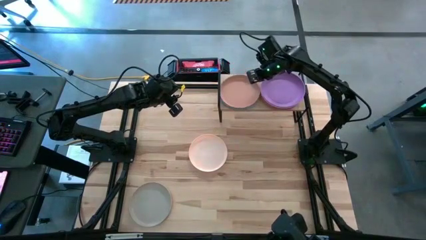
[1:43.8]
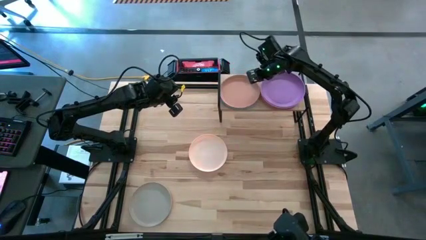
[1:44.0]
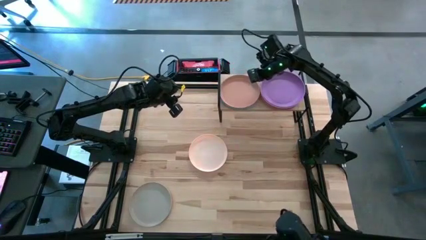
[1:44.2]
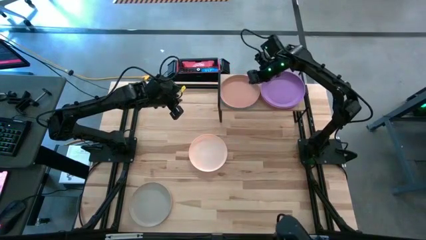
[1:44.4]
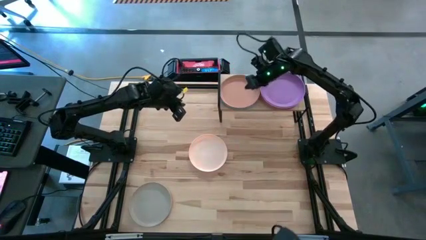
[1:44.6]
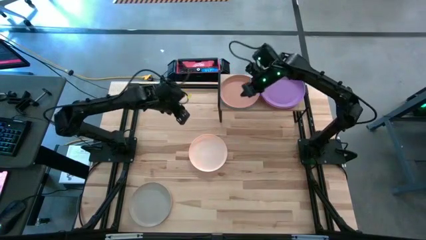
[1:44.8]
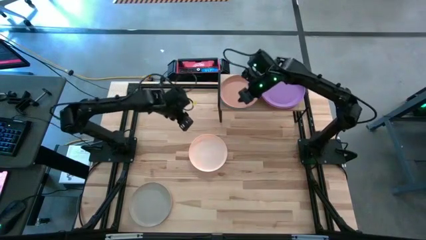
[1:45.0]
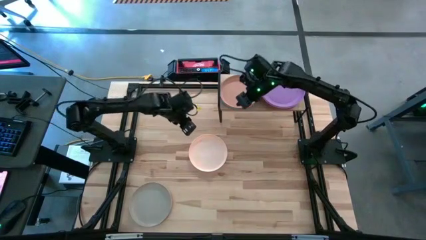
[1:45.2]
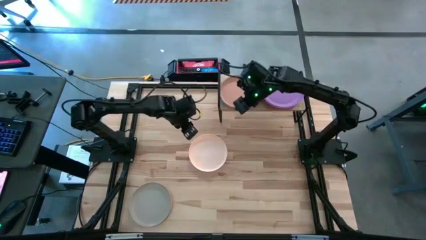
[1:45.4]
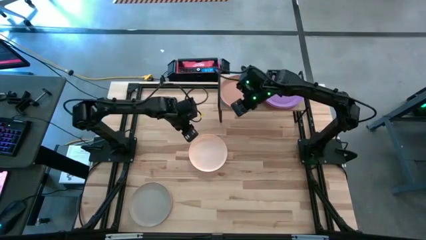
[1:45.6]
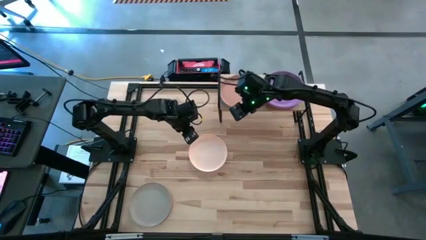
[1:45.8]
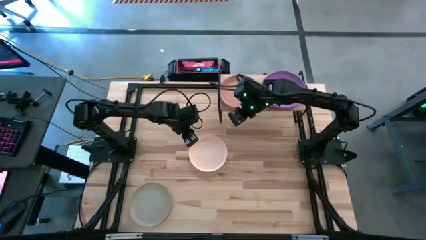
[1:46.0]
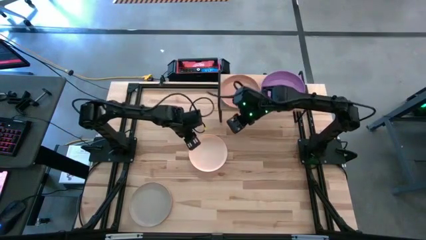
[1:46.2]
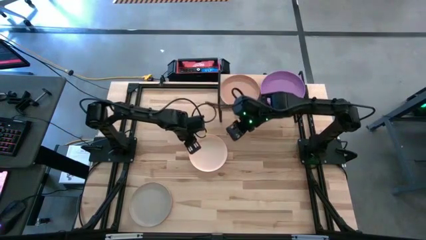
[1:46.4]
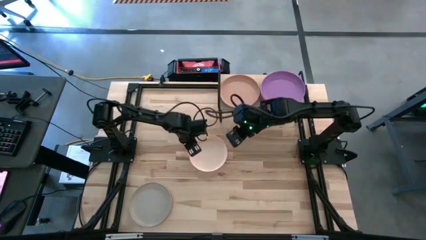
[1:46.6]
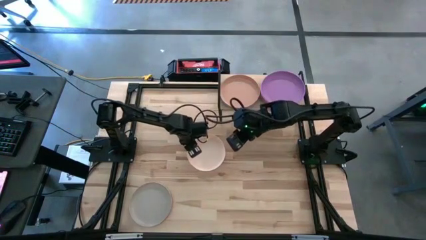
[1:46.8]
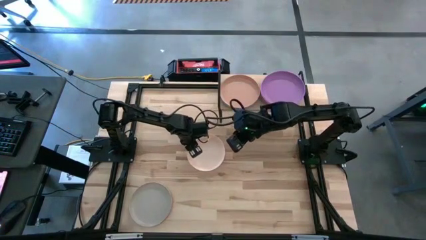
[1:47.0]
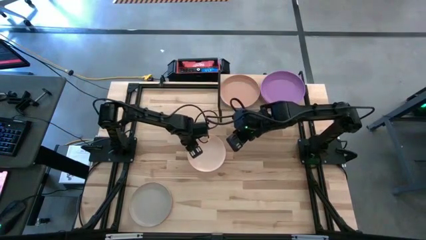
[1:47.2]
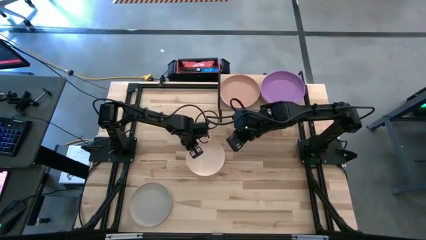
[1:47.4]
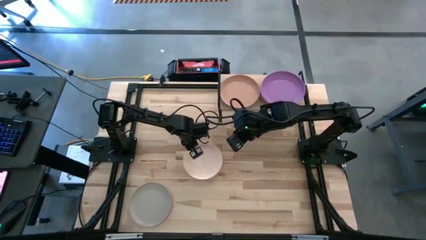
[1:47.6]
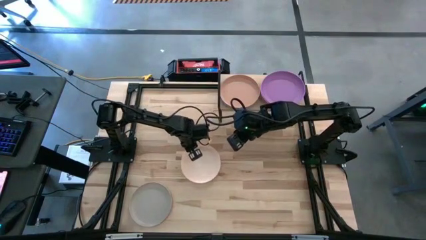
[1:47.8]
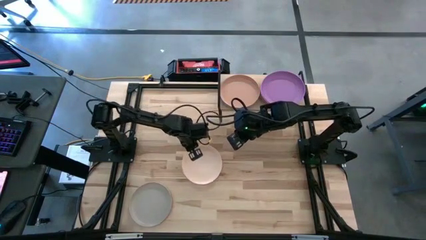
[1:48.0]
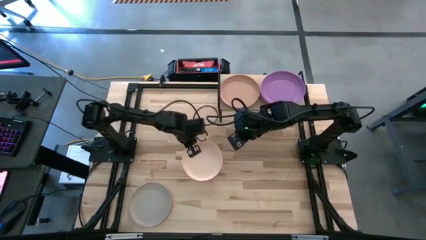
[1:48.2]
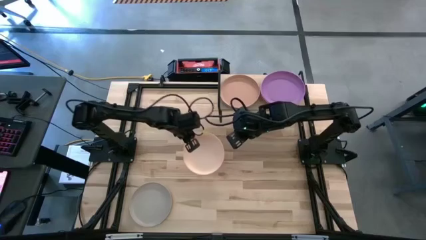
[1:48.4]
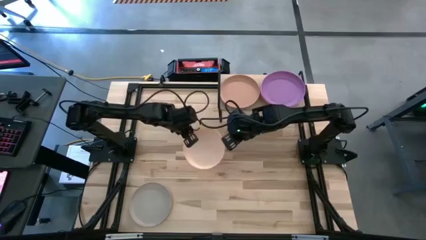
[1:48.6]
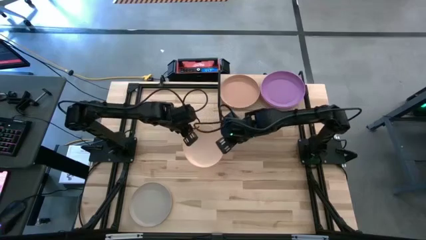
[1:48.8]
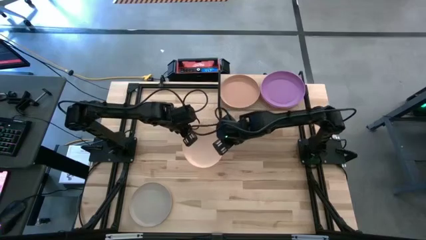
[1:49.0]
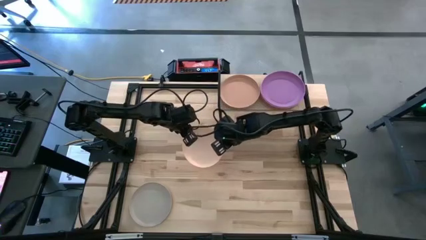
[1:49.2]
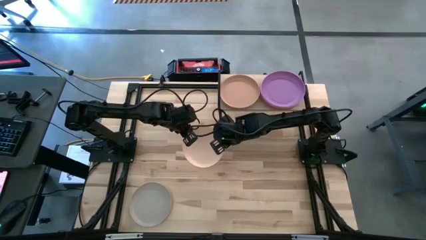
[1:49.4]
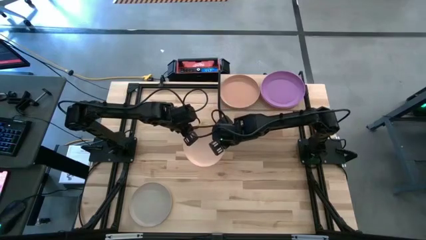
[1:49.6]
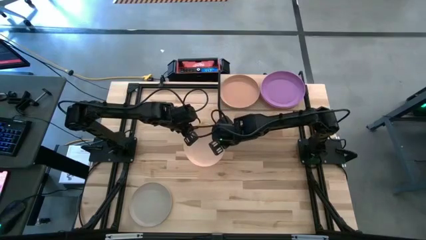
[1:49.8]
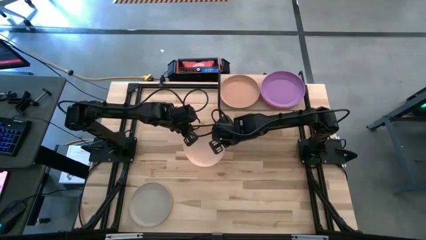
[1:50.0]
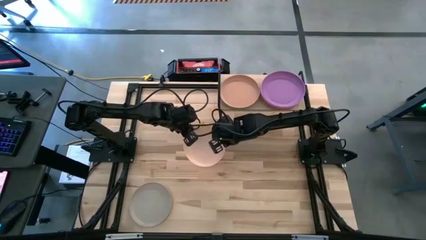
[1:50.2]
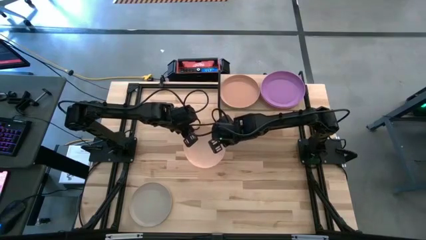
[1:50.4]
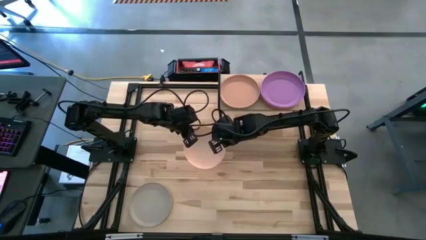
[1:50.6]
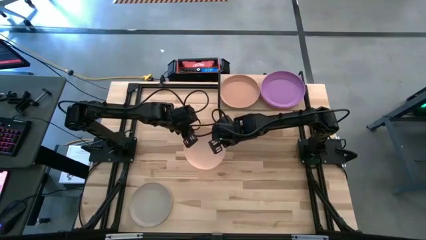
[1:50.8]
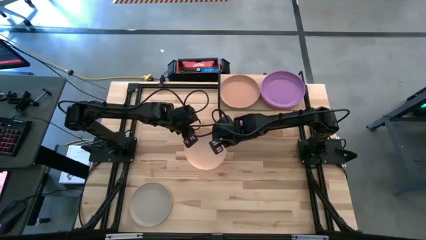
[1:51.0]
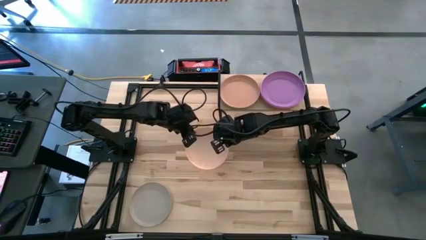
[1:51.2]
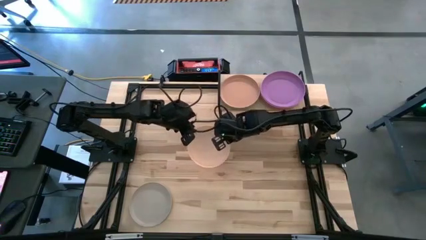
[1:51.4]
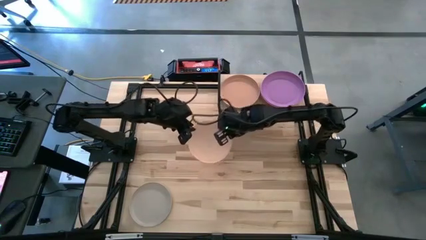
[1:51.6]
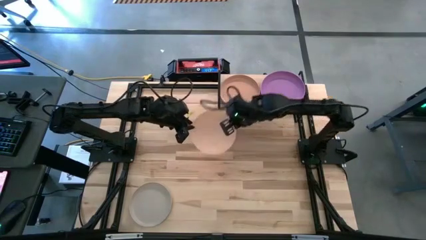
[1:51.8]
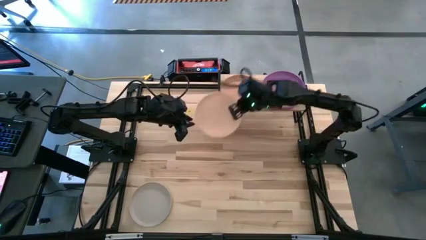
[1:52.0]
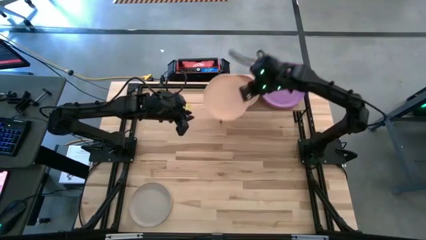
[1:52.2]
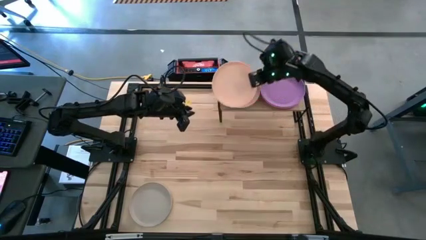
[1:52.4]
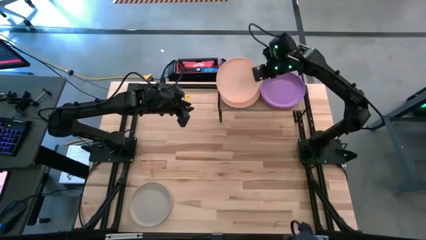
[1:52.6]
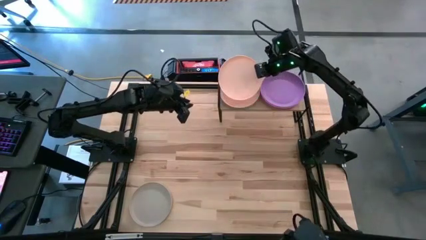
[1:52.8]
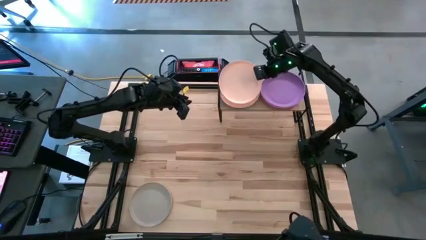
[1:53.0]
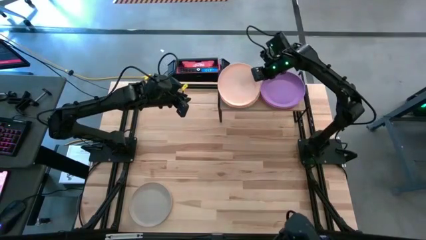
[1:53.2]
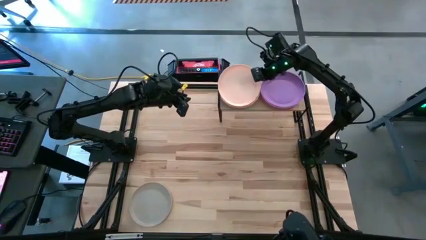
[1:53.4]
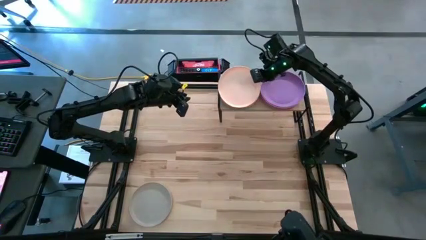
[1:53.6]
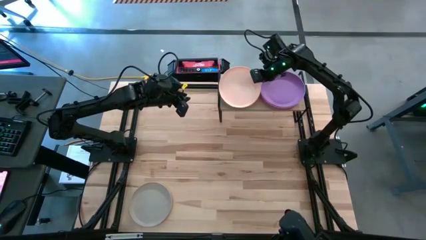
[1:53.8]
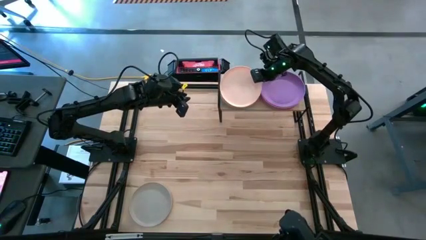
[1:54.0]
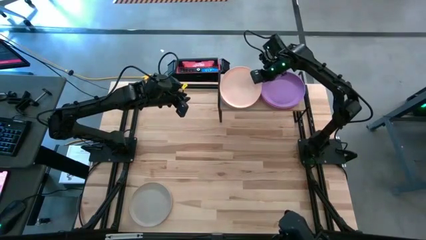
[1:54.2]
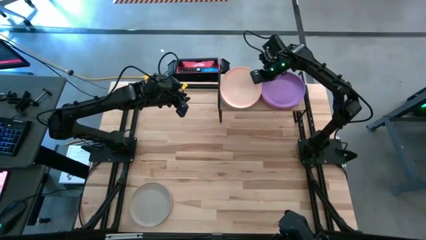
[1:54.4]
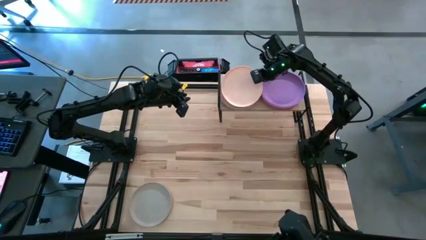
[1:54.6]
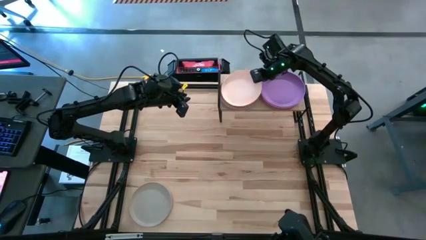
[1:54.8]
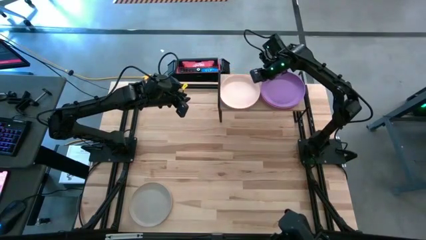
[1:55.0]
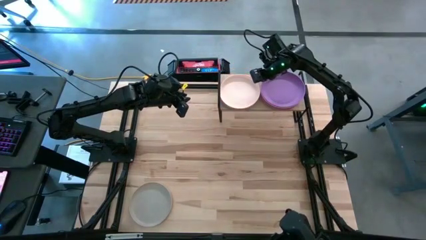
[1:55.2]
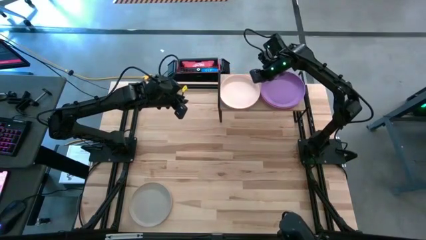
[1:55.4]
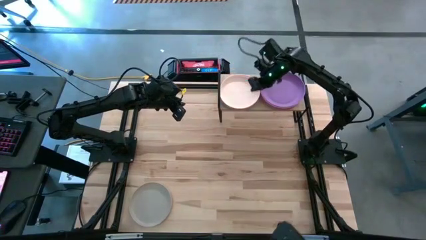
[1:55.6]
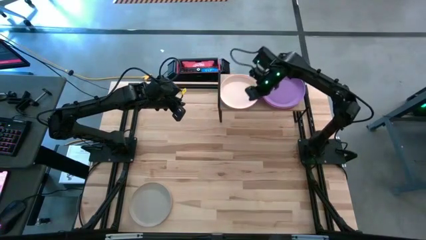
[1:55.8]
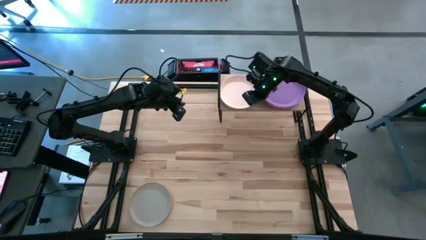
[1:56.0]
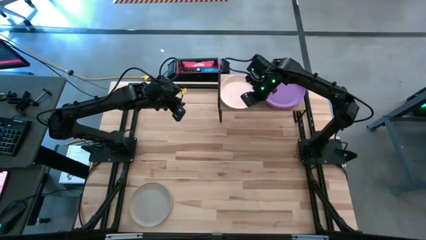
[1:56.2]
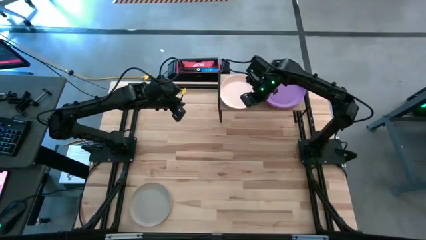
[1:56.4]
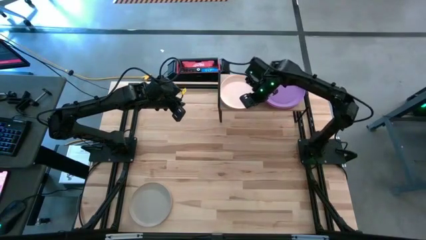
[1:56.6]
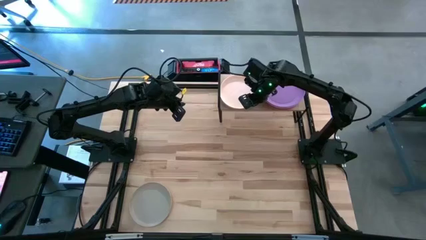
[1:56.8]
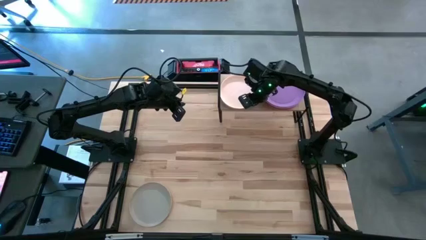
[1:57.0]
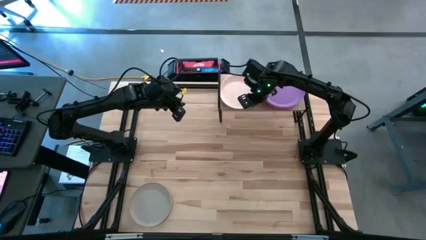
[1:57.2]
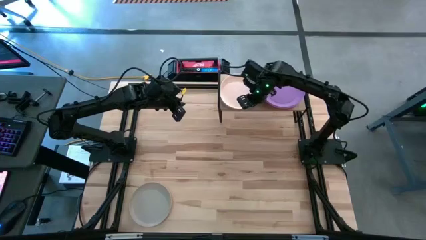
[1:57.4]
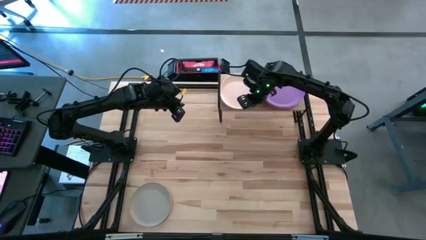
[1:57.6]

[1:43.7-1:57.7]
Task: Place and stack plates onto a shelf
Stack the white plate on top of the brown plate on the shelf
